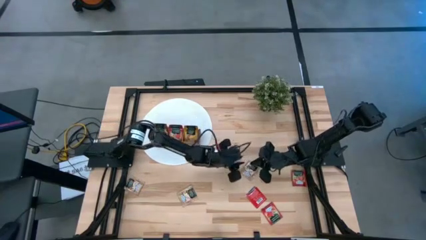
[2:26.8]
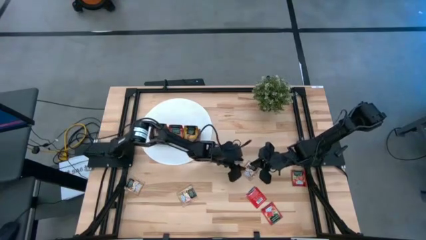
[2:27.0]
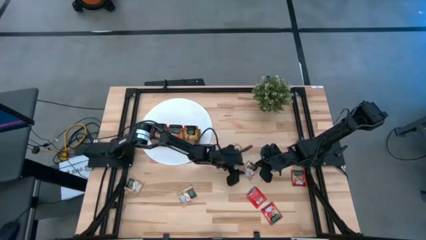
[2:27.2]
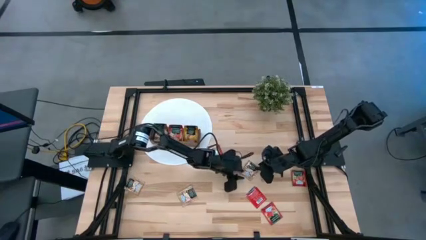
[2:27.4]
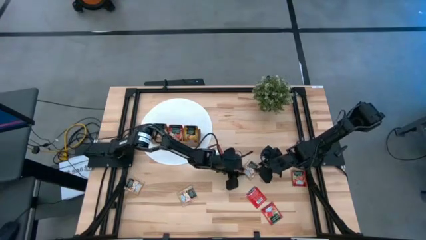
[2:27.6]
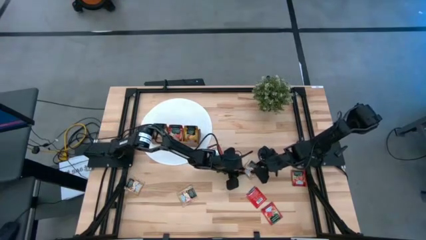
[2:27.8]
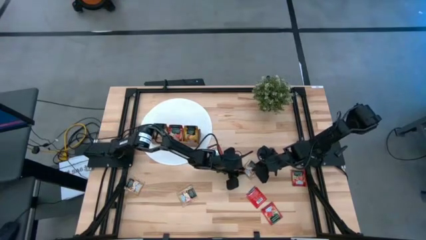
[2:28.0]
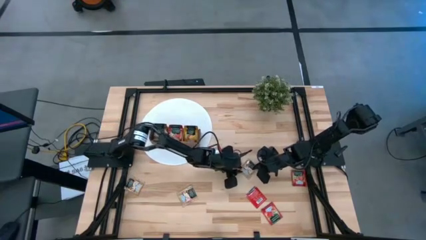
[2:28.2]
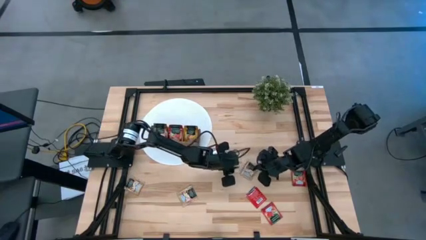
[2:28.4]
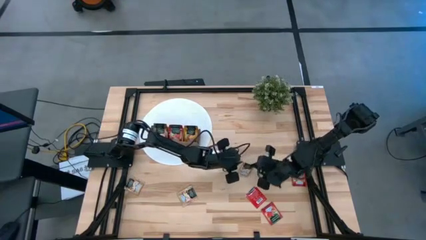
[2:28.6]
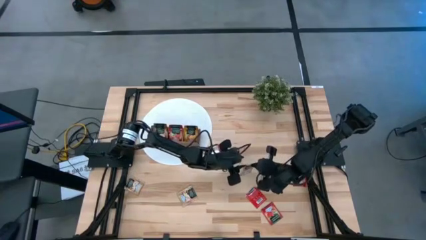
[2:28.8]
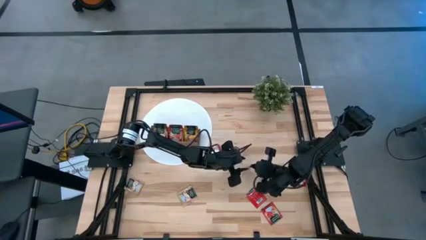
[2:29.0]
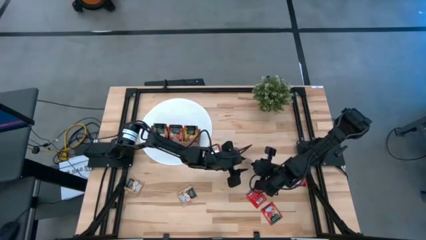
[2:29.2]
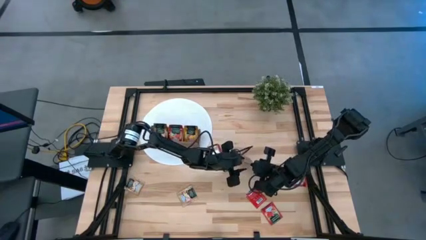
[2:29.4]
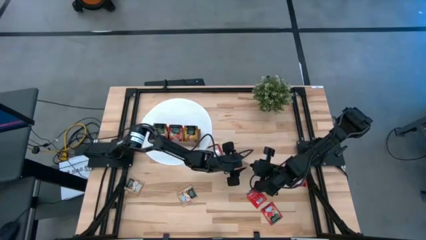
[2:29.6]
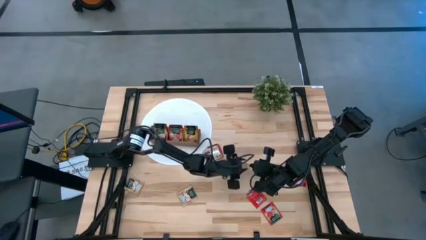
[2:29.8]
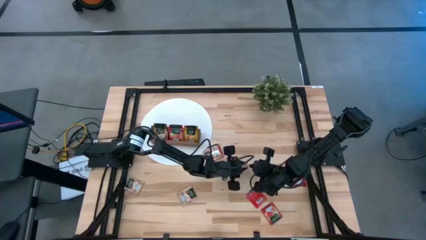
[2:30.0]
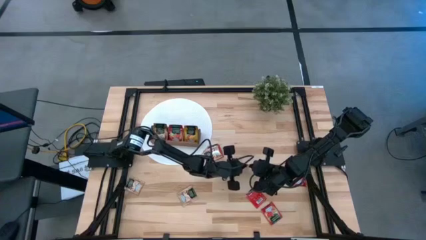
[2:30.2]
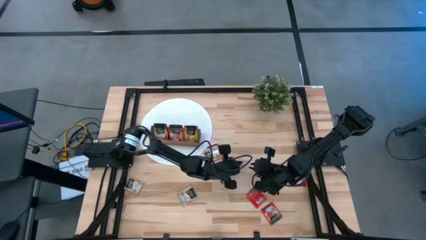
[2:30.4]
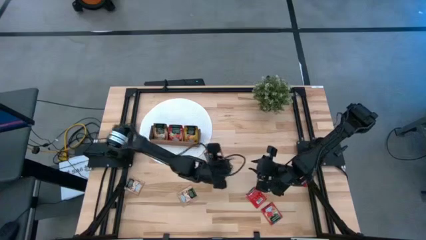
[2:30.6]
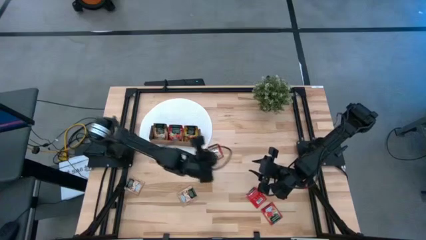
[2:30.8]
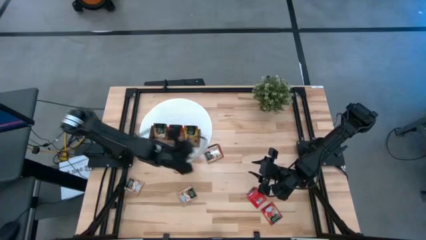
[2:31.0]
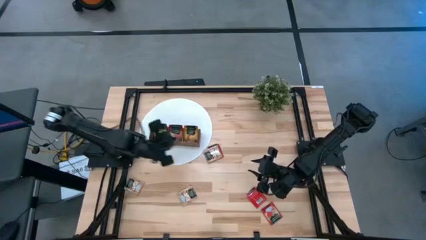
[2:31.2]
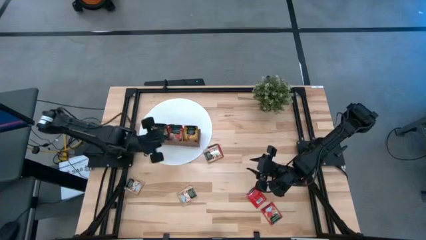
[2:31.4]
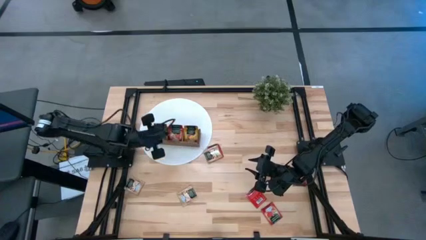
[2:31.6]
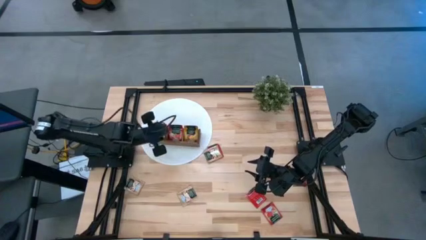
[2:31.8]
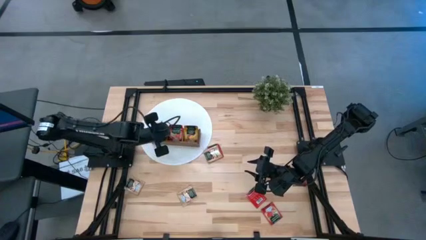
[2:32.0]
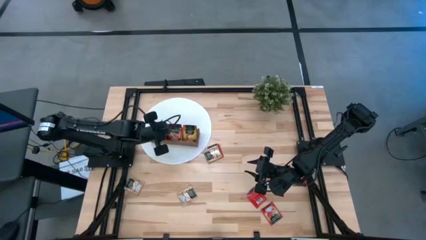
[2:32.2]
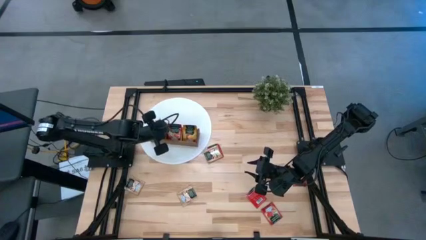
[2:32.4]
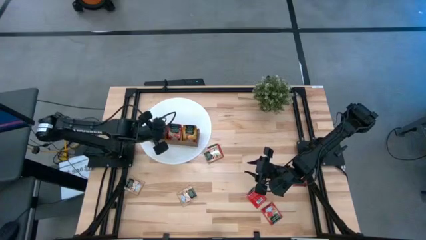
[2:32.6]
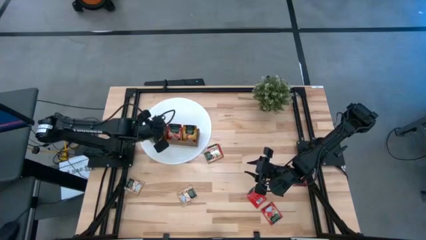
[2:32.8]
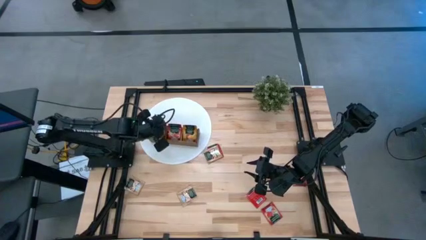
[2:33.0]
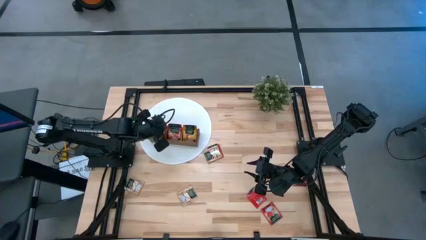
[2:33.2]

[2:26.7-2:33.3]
Task: Pick & Place Tea
Put the brown tea bag into the left section of the wooden organizer

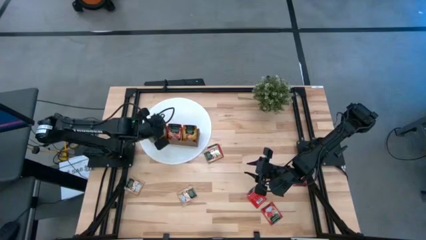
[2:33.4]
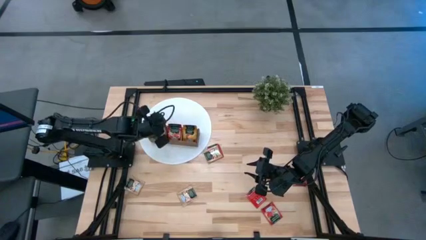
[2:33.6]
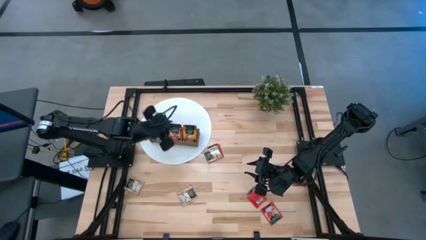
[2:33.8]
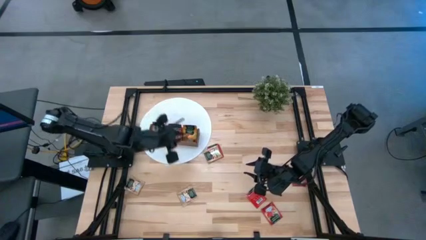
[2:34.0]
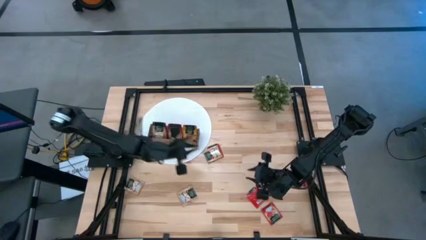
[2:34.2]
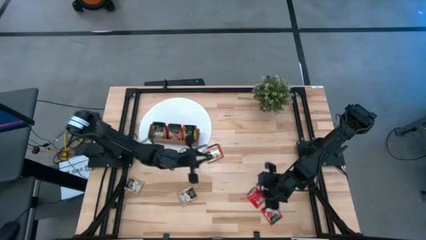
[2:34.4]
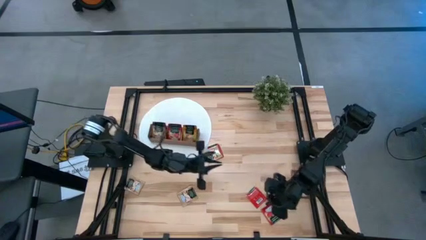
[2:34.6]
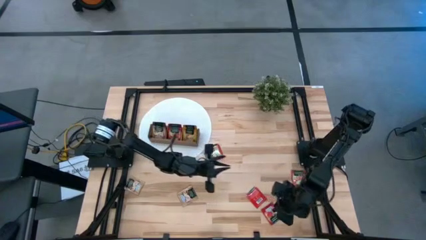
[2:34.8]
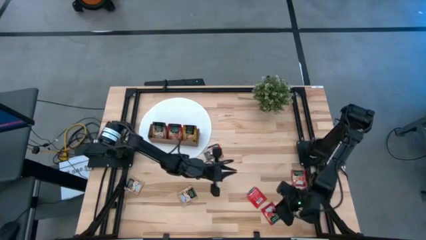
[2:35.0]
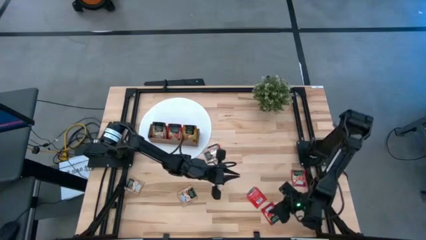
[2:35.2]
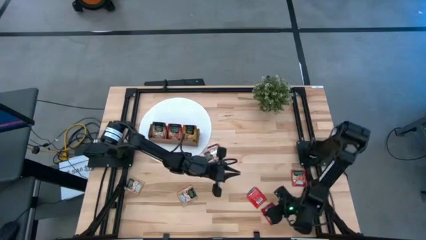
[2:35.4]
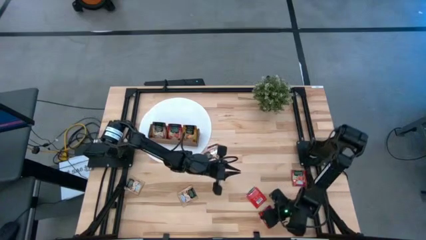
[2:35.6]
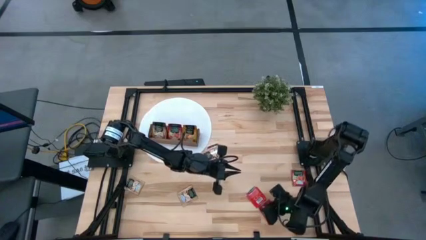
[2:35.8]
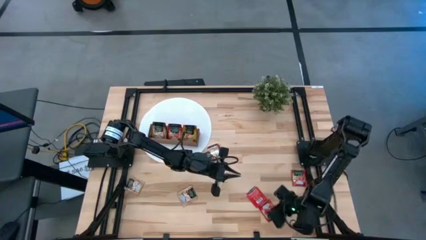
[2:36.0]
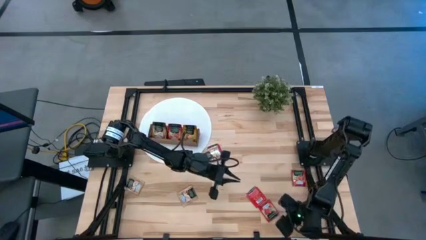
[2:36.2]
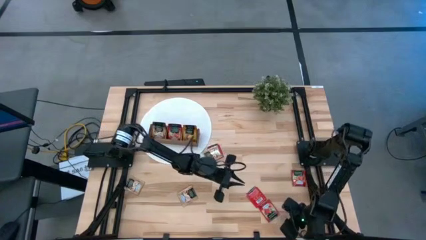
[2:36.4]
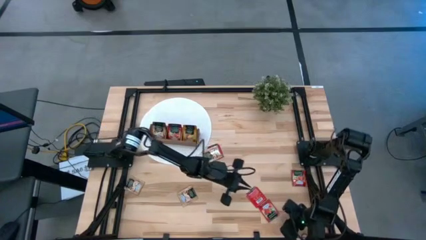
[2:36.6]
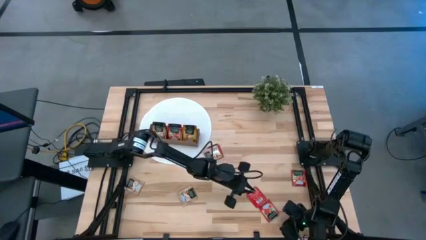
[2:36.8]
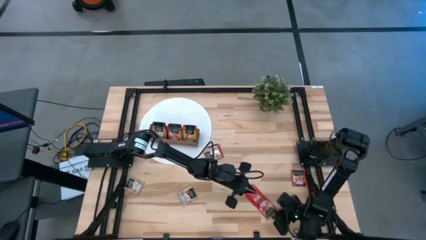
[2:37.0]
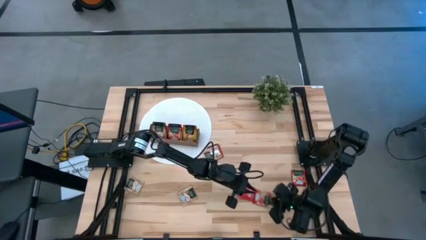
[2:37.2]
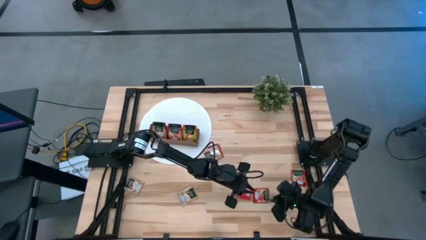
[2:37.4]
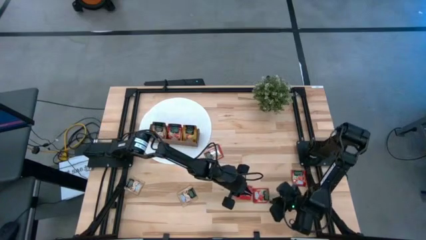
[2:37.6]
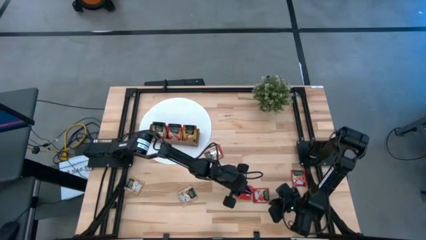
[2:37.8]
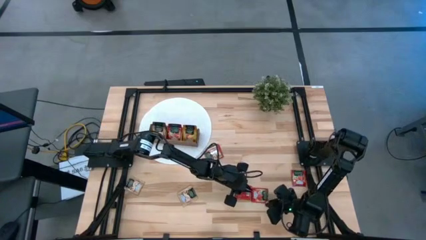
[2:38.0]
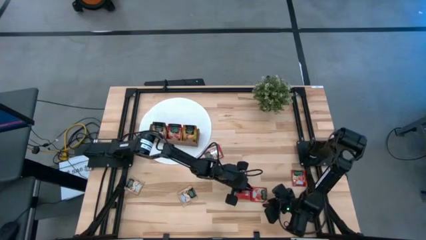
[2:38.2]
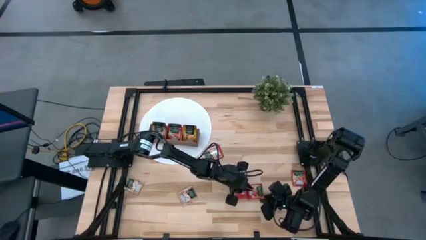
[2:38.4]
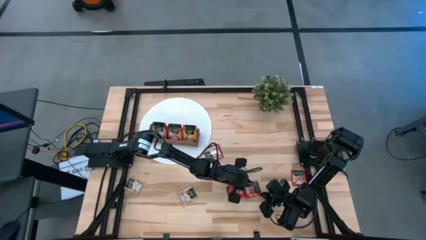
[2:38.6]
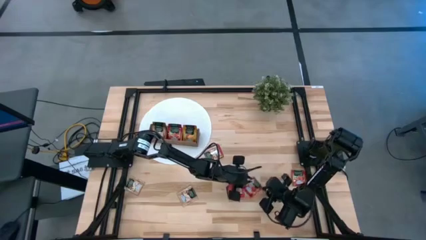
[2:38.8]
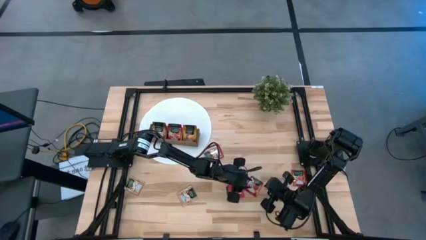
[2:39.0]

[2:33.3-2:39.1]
Put the red tea bag into the middle section of the wooden organizer

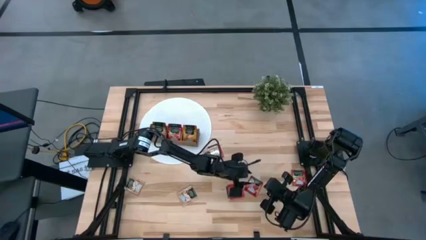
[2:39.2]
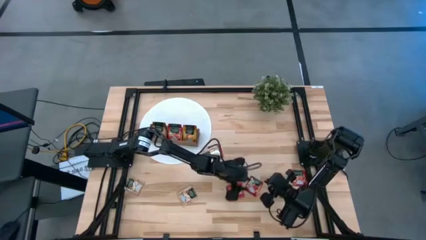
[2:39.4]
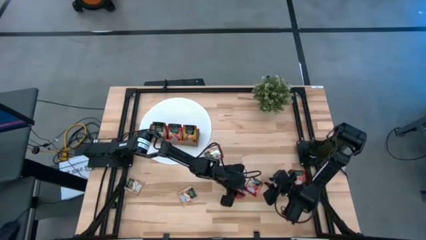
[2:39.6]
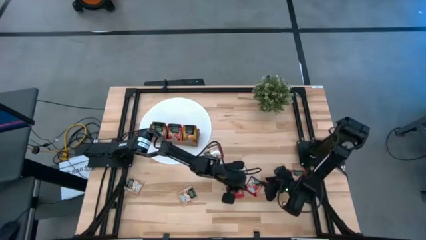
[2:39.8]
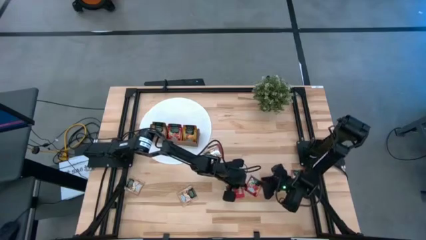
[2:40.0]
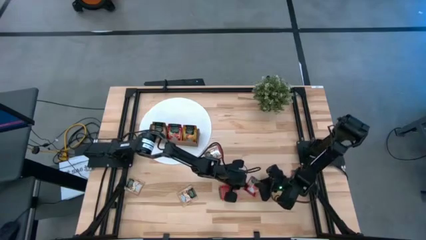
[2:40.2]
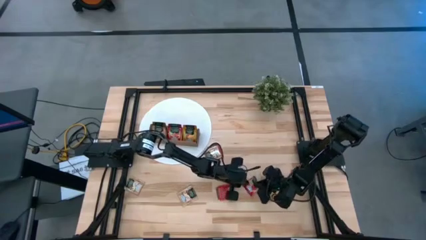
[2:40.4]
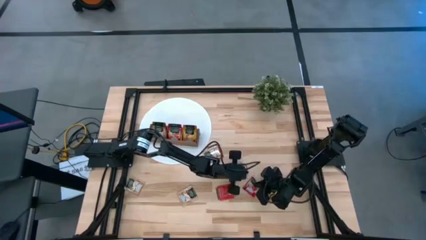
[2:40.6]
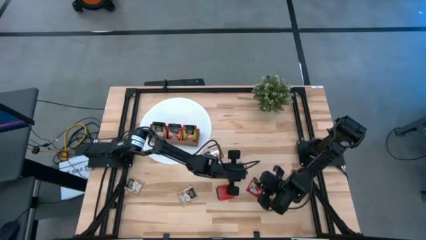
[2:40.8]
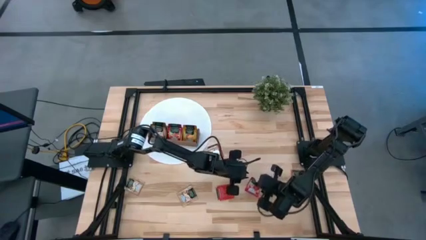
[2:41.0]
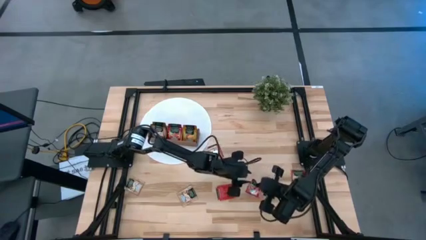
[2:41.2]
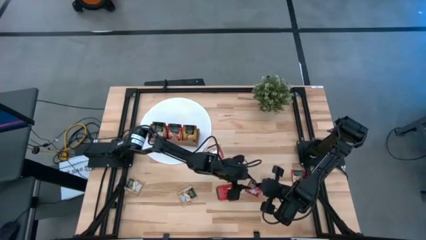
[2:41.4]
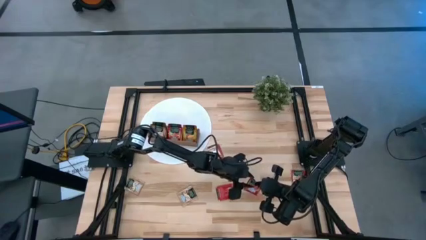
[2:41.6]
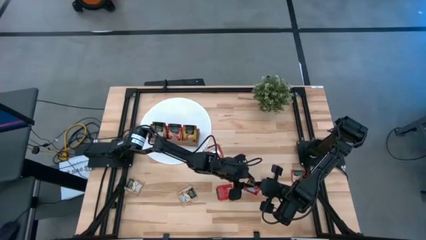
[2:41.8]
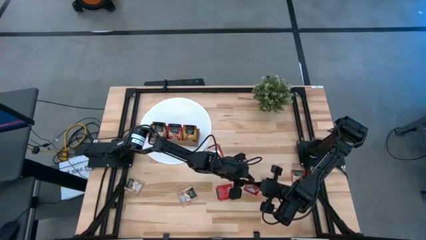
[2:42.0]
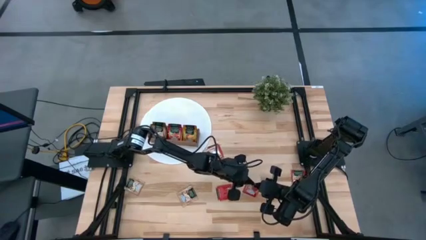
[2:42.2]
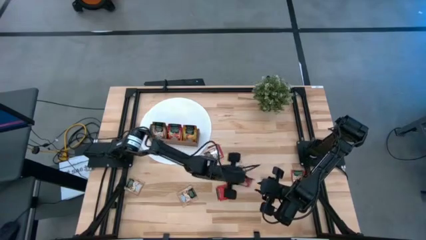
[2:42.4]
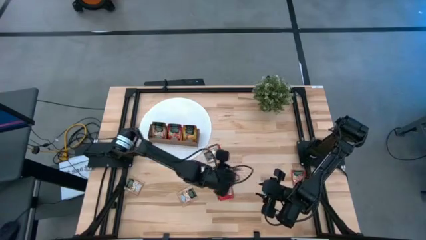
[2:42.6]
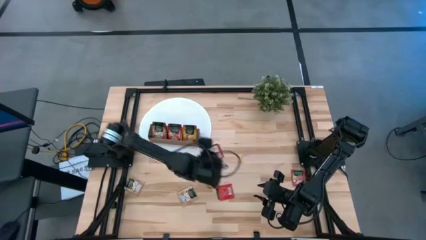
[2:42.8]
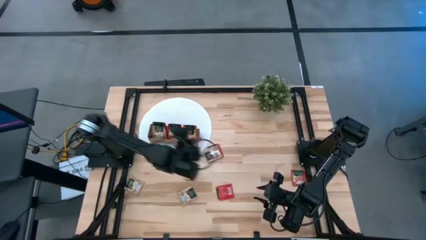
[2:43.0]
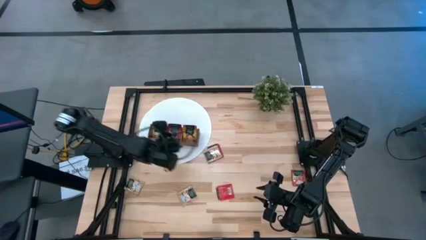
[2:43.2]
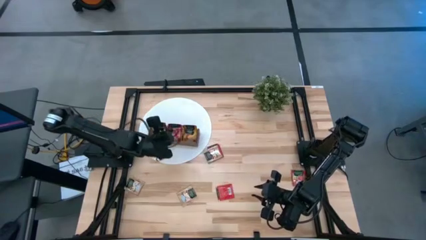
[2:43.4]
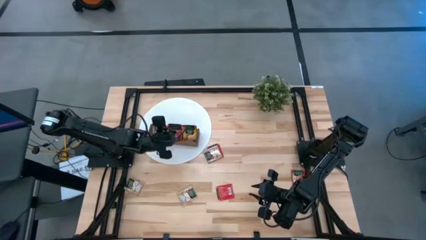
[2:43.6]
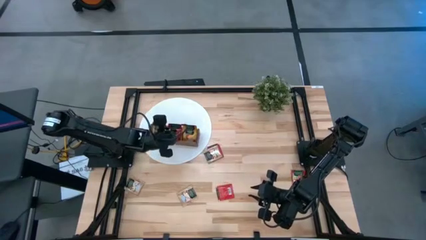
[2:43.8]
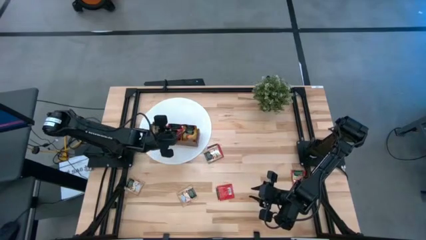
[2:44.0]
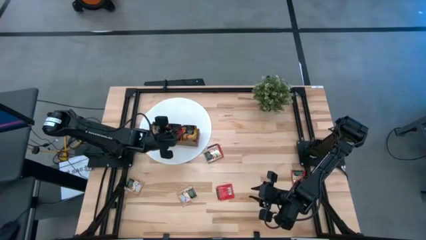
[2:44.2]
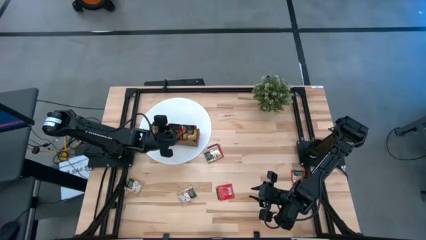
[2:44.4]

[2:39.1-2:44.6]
Put the red tea bag into the middle section of the wooden organizer
